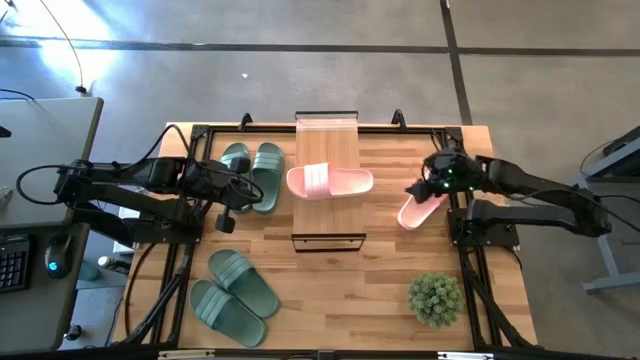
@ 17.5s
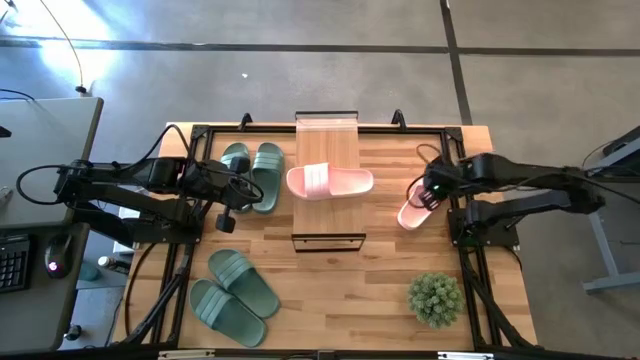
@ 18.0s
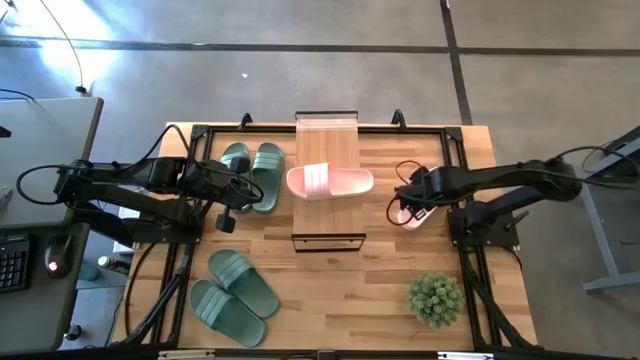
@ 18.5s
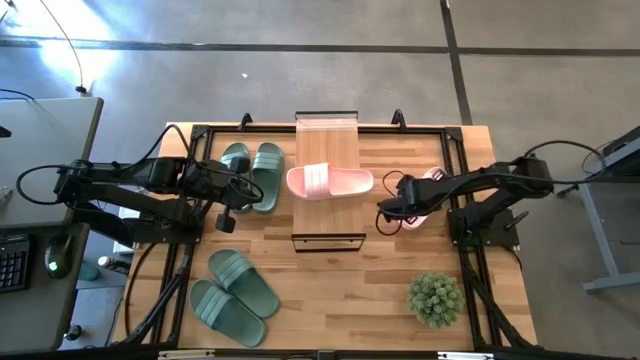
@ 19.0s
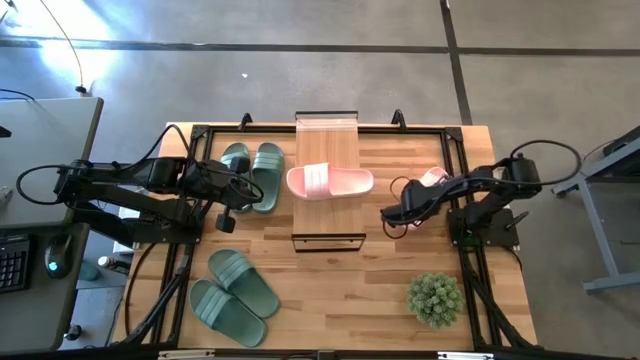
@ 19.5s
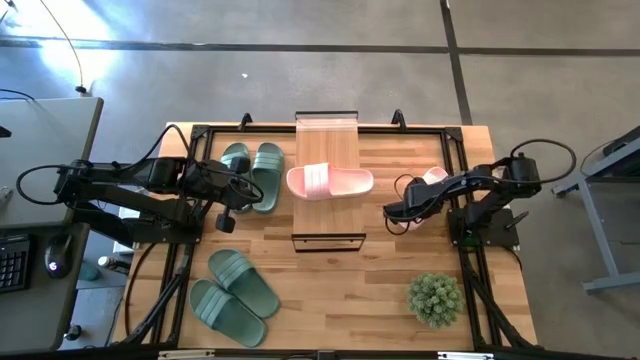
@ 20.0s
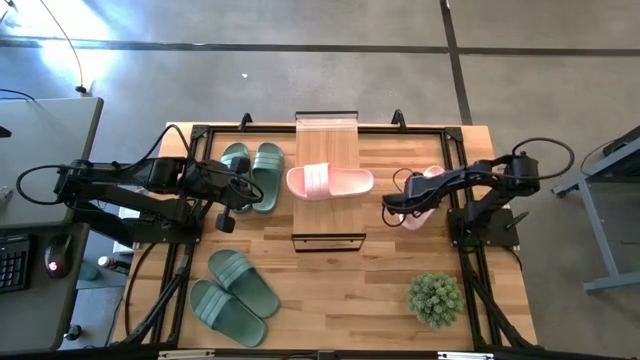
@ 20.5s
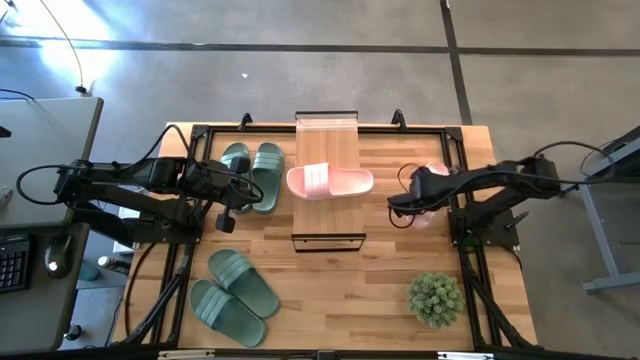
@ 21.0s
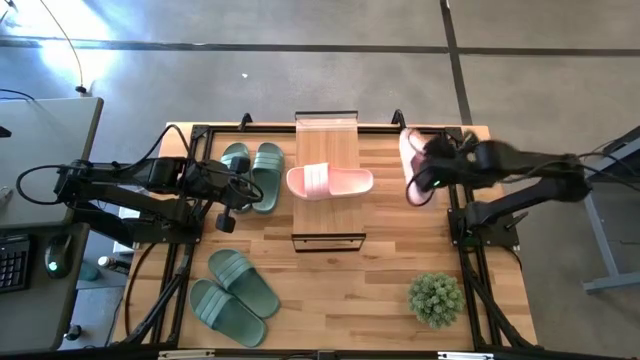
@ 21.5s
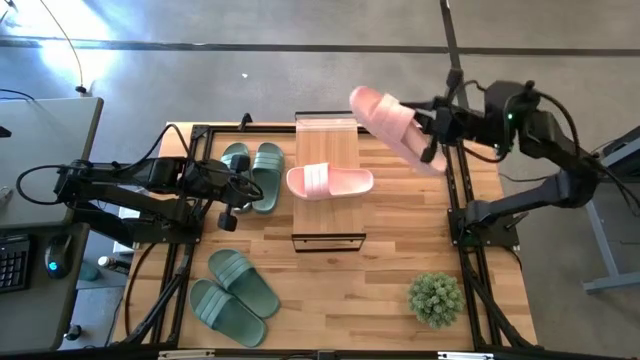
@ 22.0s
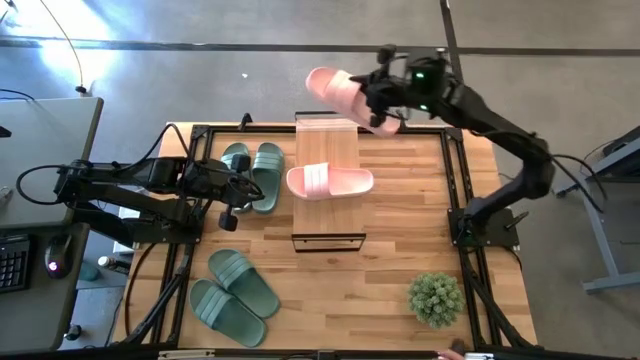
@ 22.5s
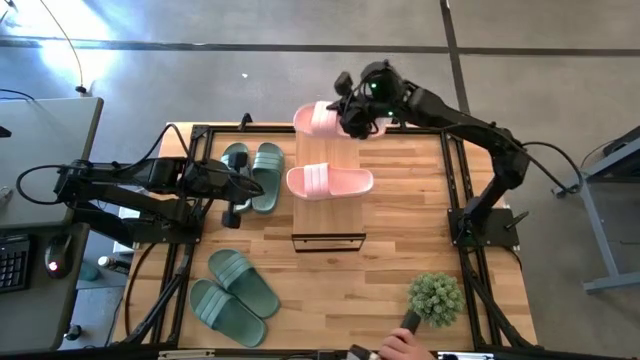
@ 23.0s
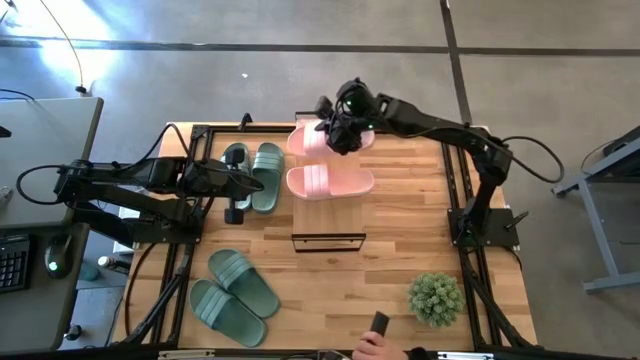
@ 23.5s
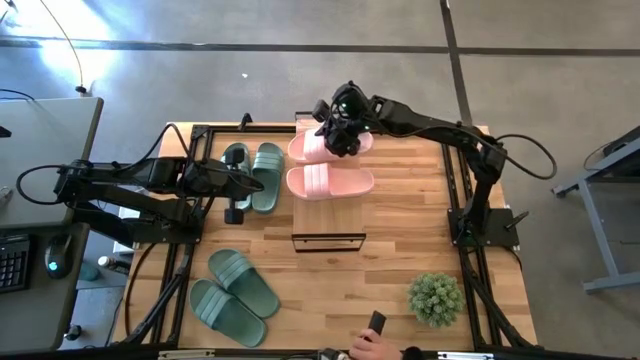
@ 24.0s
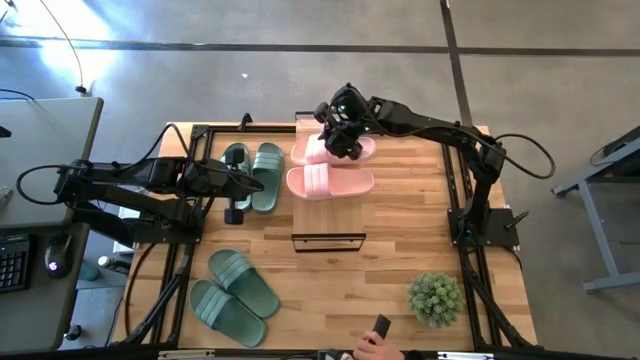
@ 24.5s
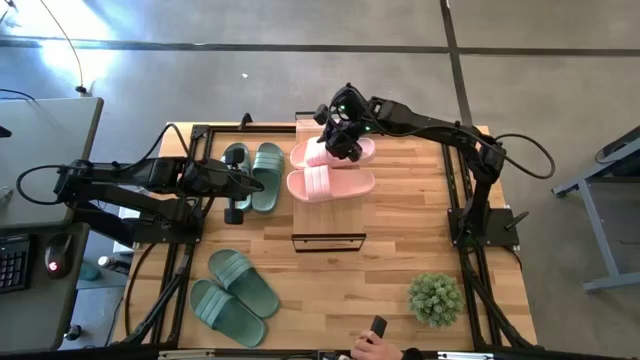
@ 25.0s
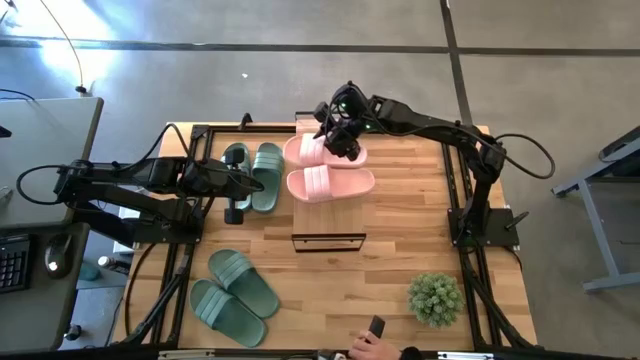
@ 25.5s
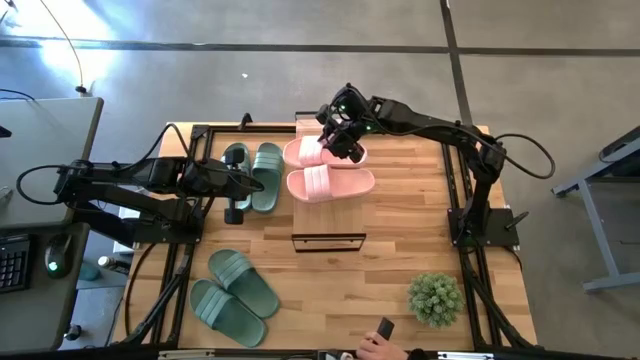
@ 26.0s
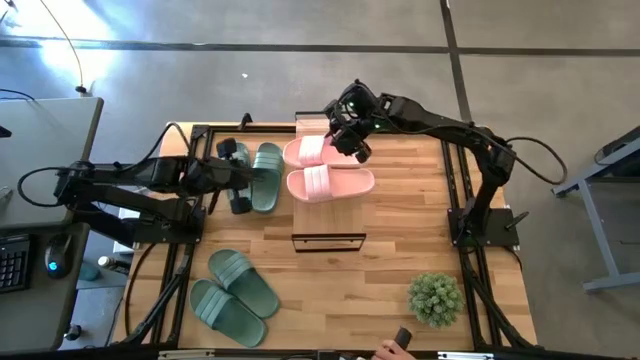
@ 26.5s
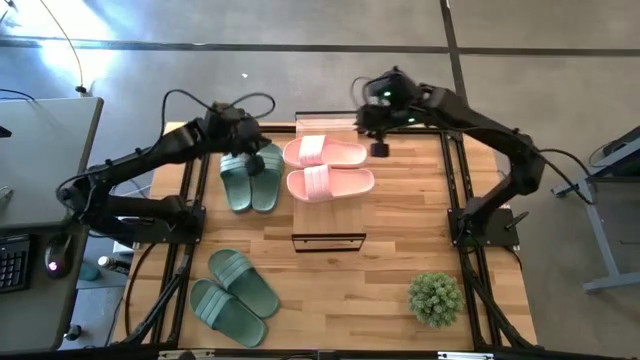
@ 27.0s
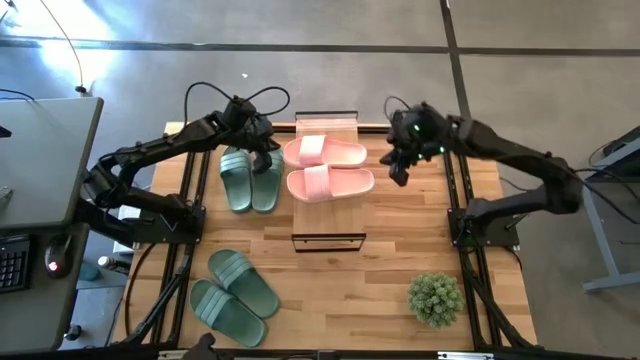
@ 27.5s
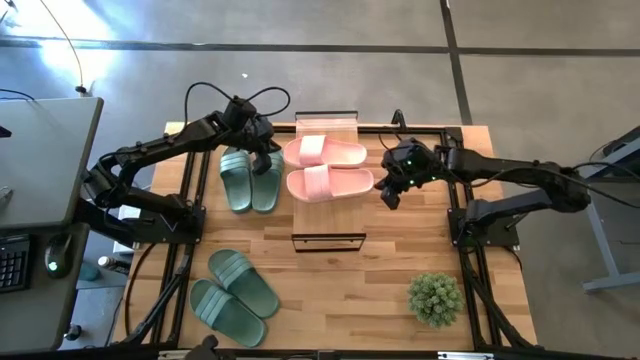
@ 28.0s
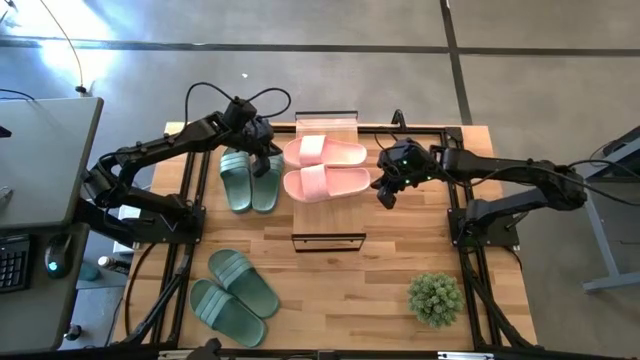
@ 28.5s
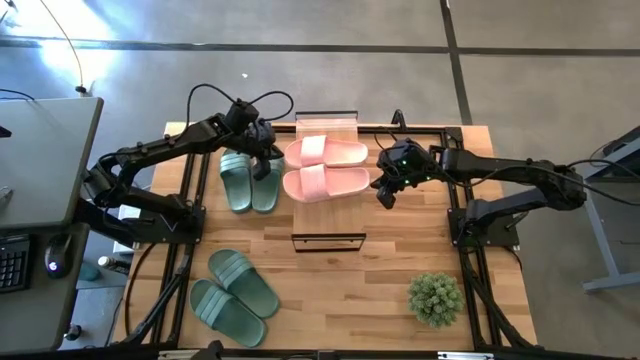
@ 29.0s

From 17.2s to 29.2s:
Task: Pick and place slides into the shelf
Put the pink slide on the shelf

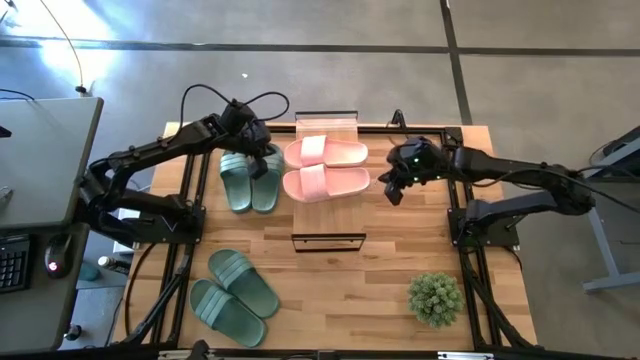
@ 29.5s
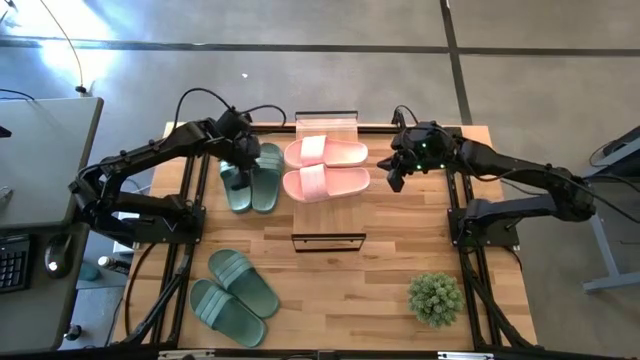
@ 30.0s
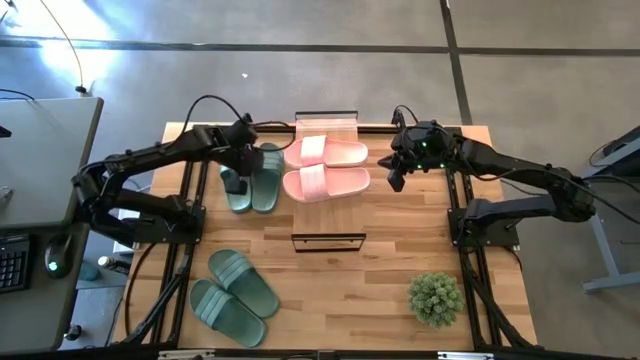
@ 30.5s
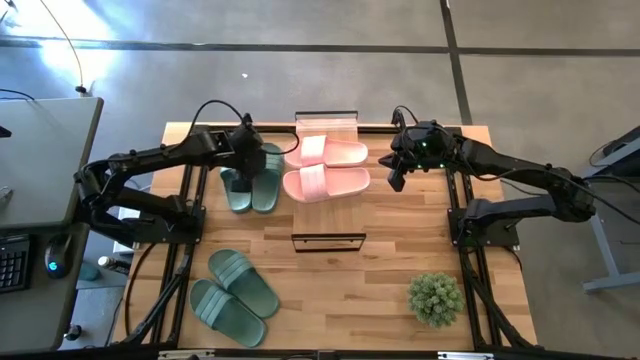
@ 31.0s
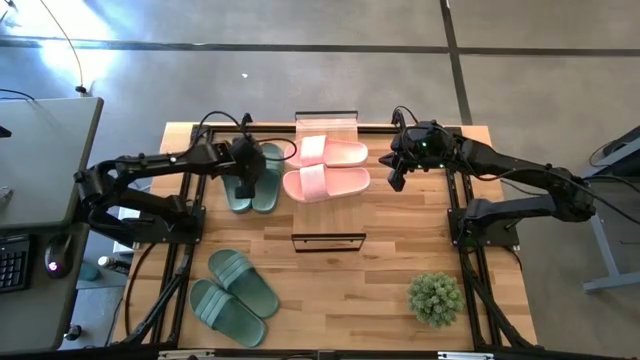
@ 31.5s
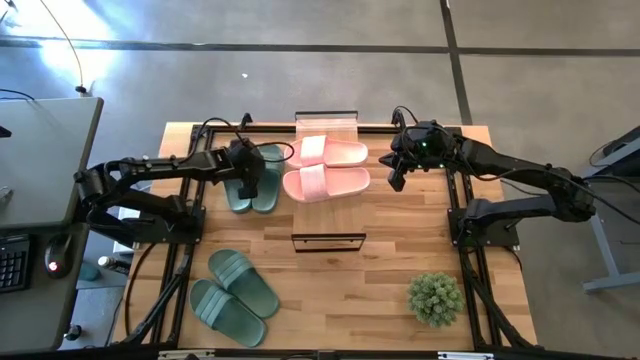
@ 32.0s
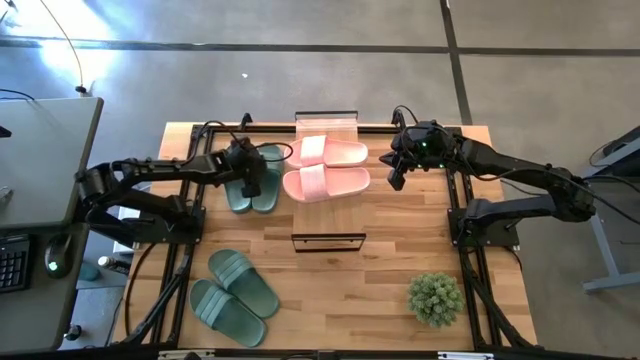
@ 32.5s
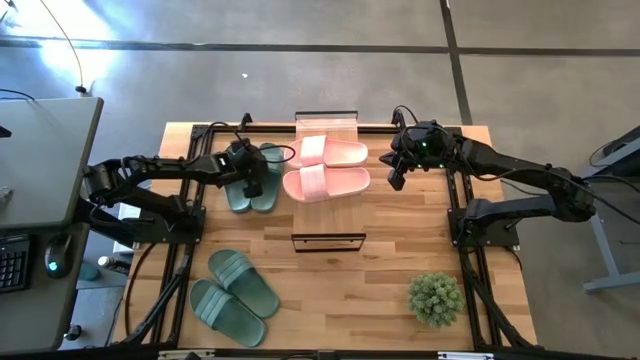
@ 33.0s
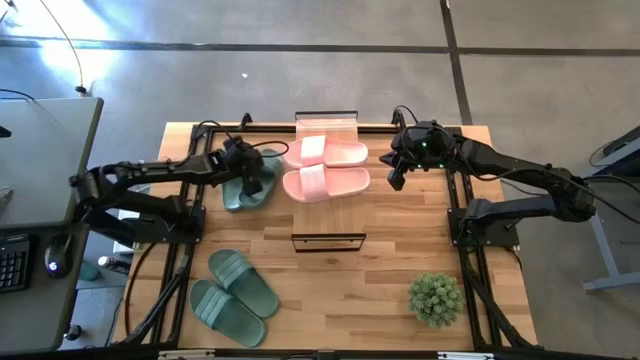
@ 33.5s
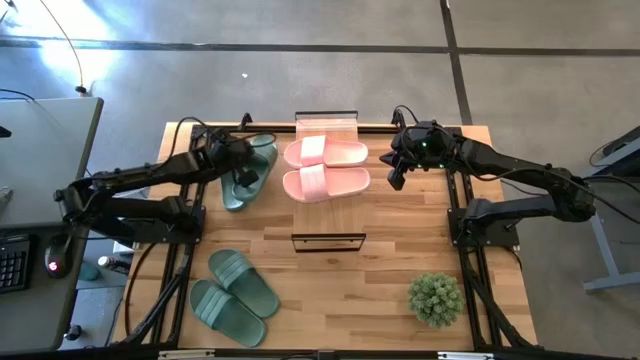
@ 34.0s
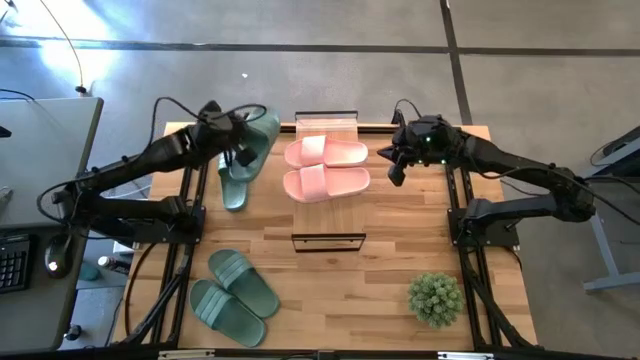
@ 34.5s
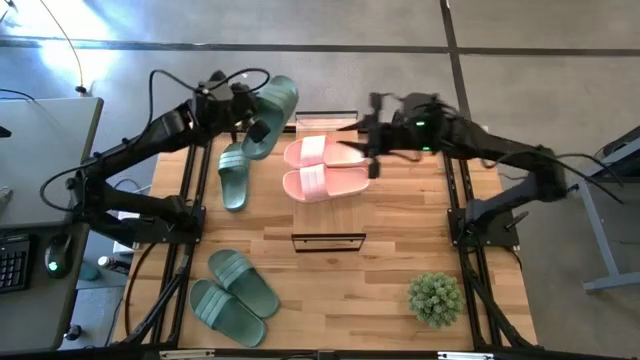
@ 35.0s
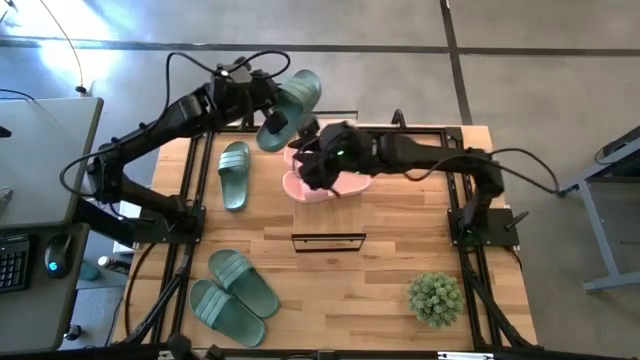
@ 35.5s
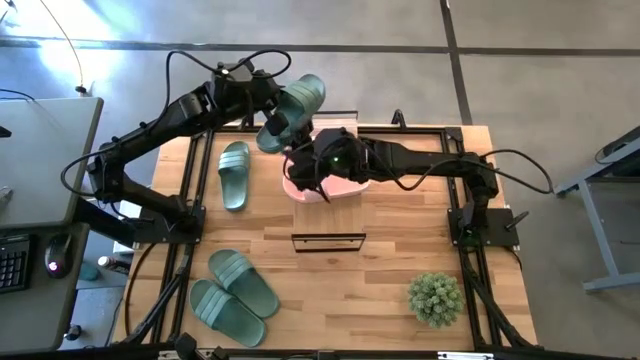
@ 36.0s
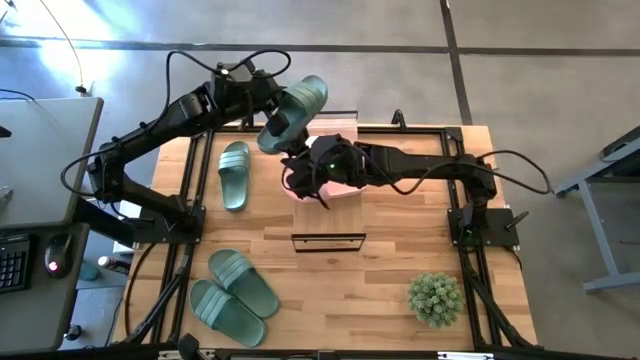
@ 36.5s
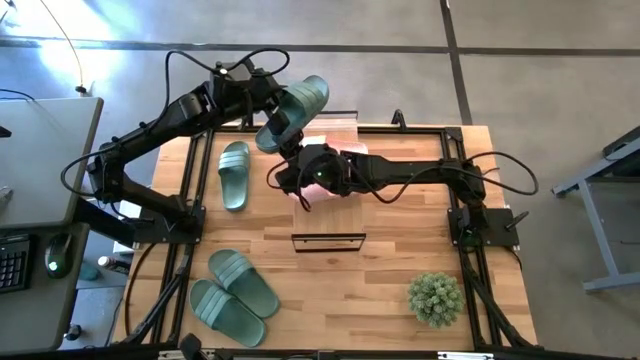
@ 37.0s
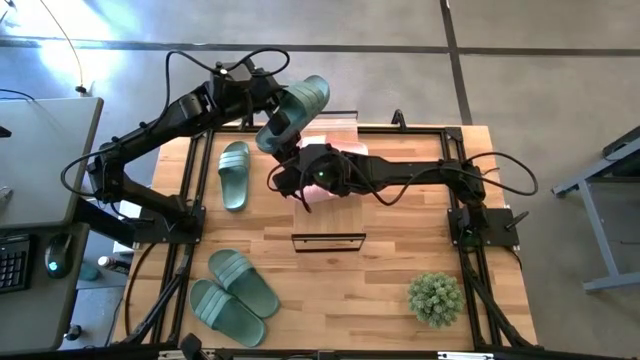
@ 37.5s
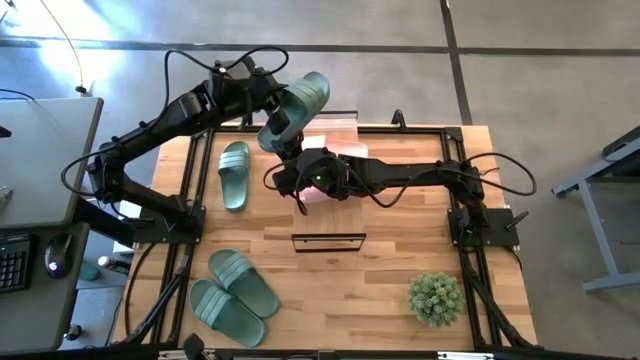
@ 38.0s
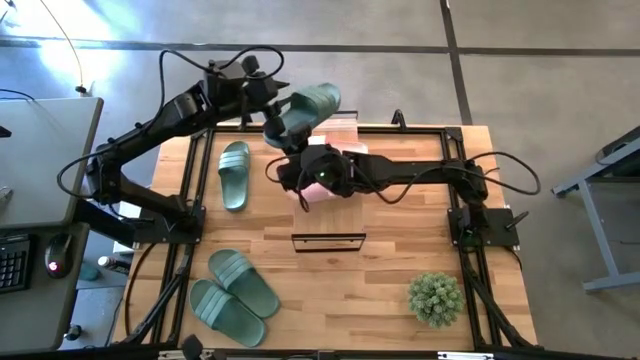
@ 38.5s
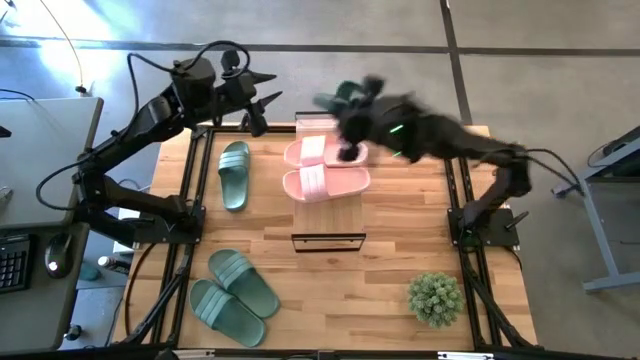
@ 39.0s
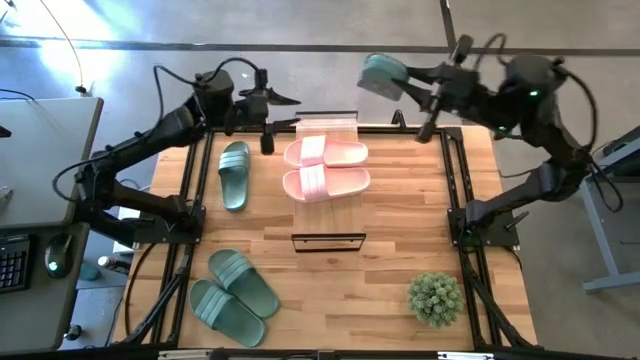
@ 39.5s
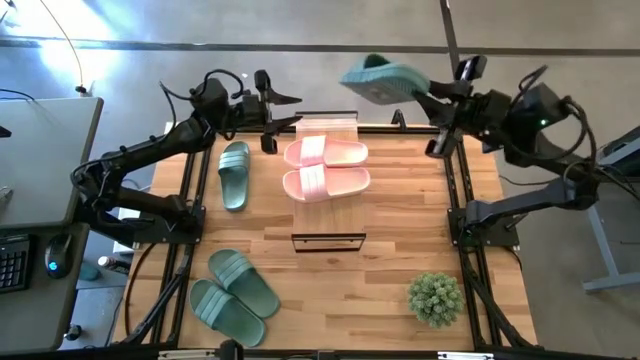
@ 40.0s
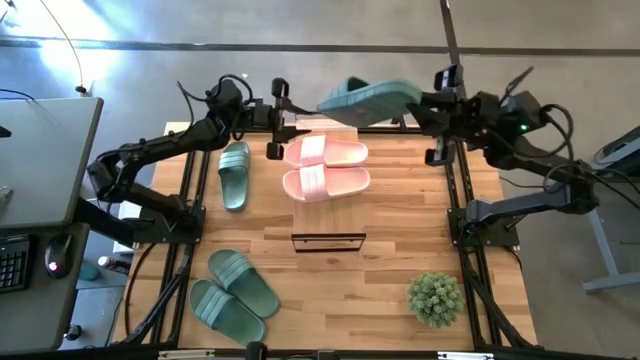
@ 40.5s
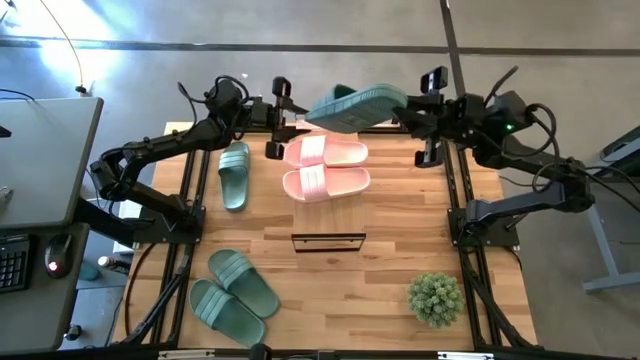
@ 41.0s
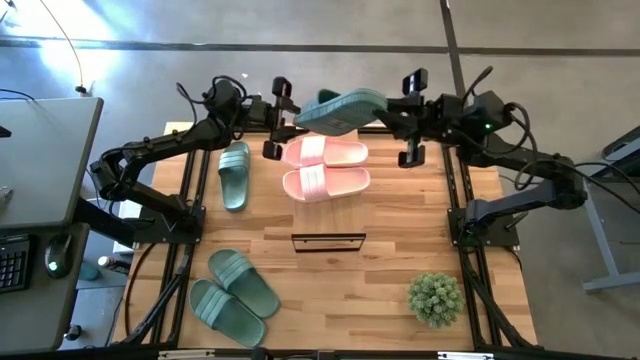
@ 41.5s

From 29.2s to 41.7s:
Put the green slide under the shelf
